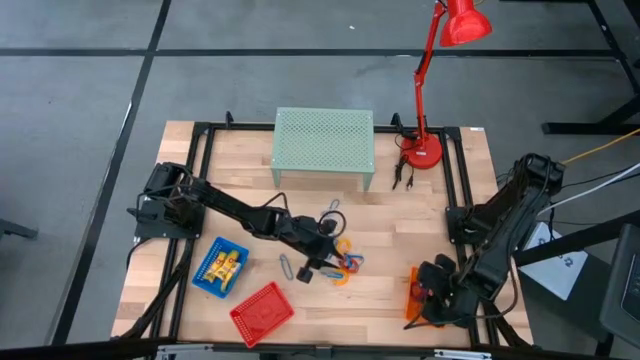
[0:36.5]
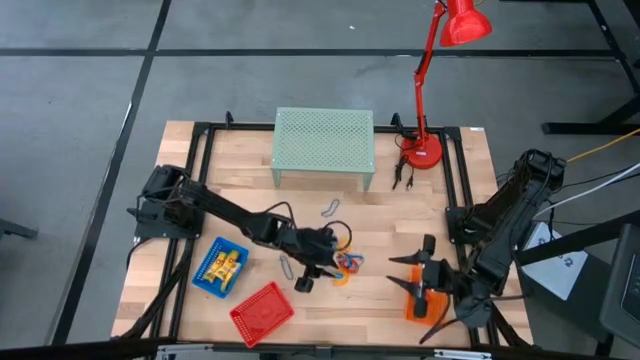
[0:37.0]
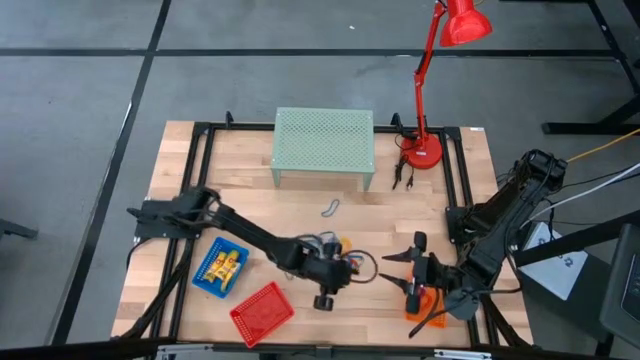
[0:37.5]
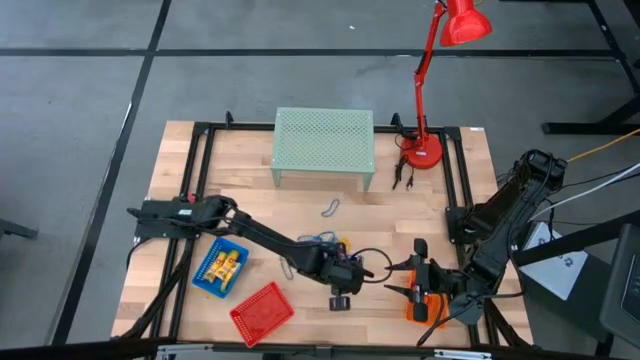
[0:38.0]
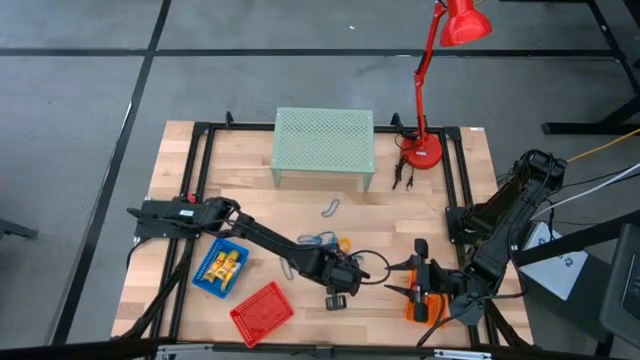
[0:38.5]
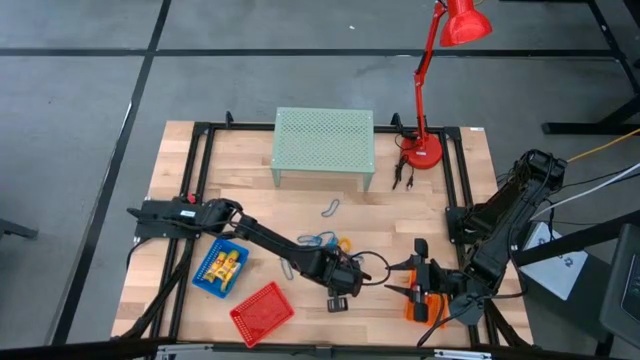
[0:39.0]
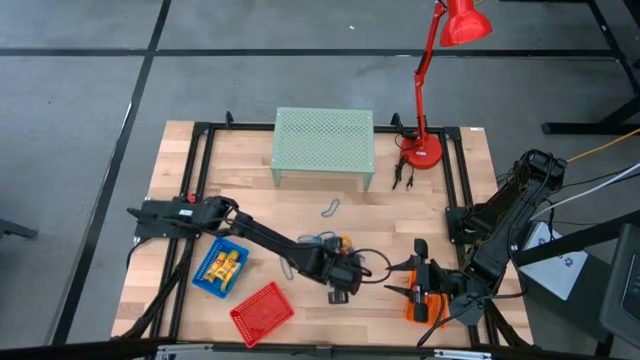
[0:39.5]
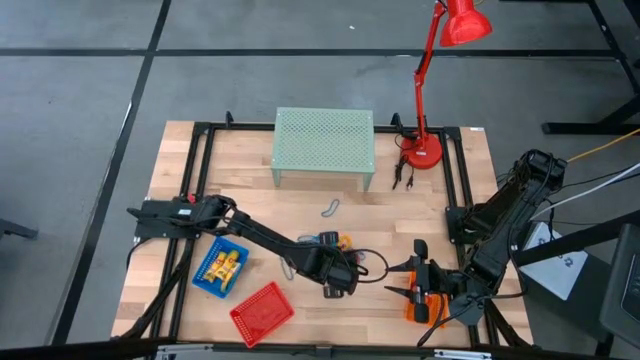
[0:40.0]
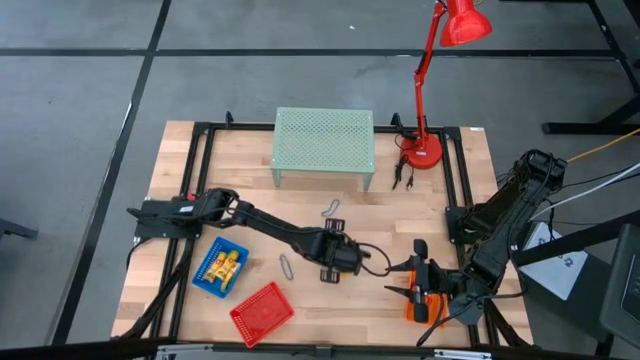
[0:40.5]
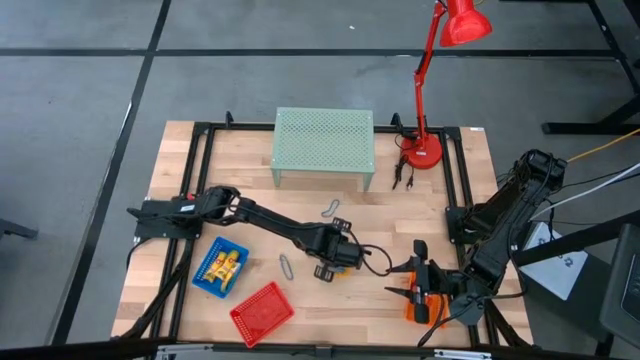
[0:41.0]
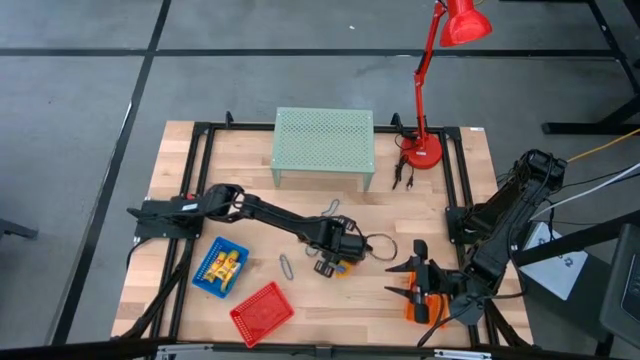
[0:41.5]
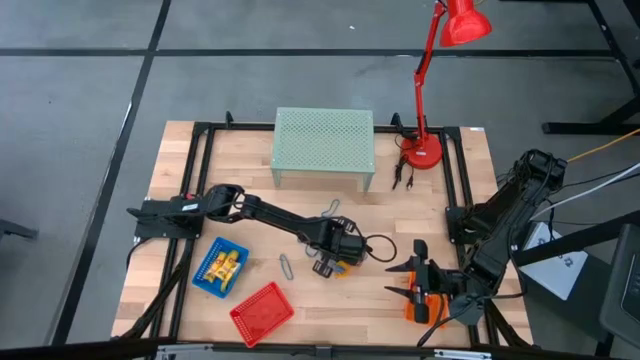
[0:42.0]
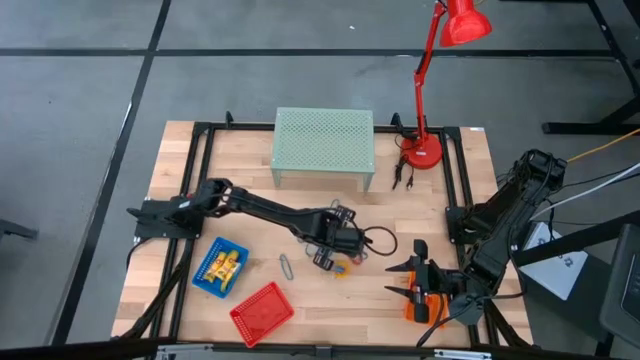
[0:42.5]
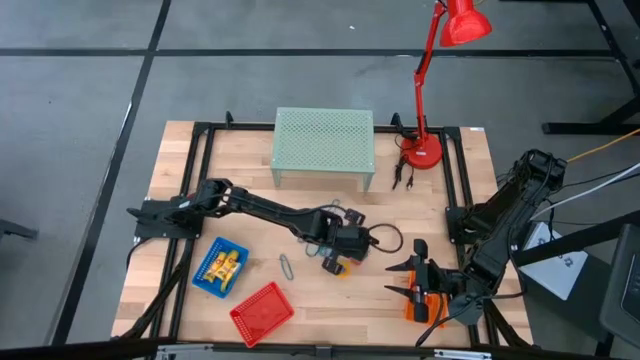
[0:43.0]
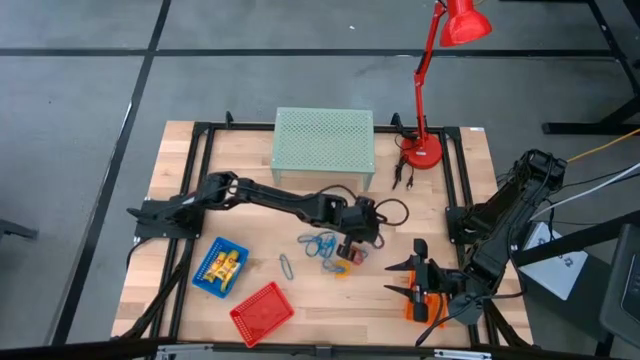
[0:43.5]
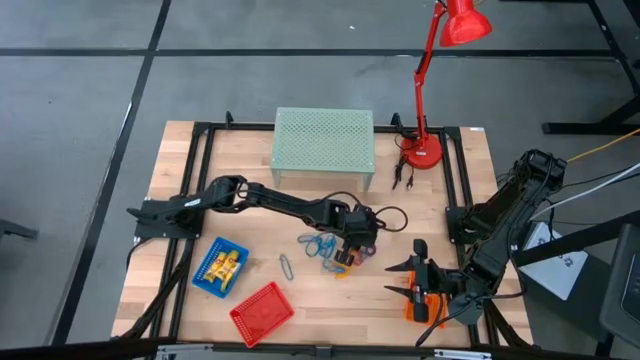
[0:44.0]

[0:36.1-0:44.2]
Task: Pick & Place Office Desk Supplies
Put the yellow spring keychain into the orange bin

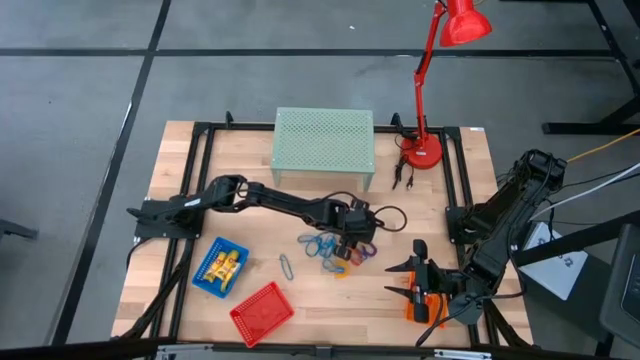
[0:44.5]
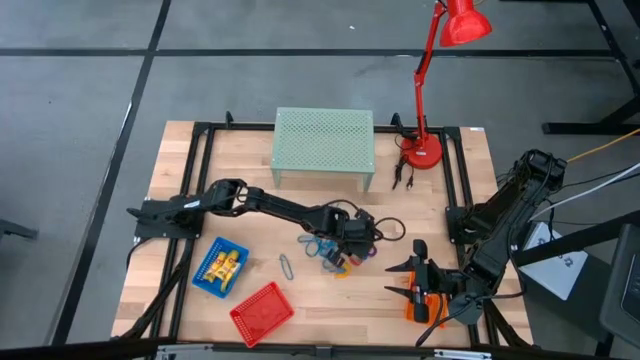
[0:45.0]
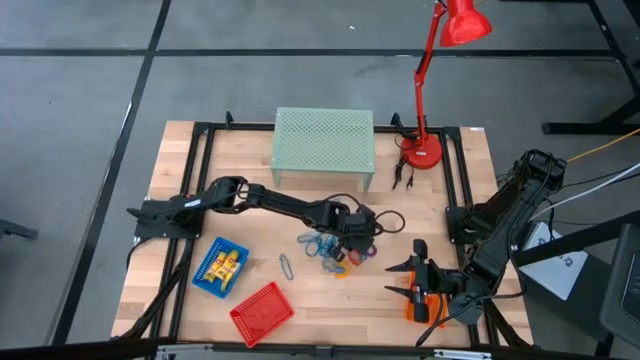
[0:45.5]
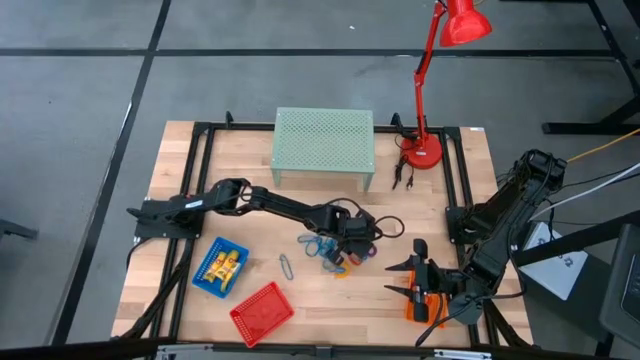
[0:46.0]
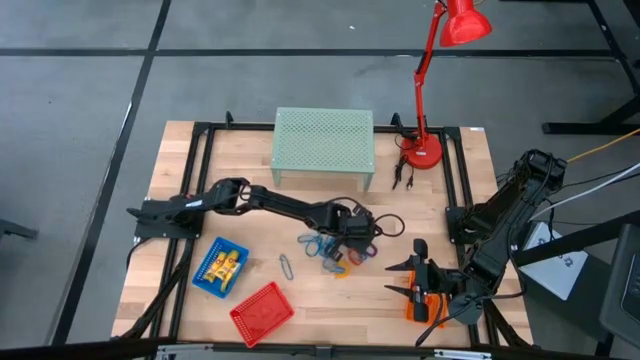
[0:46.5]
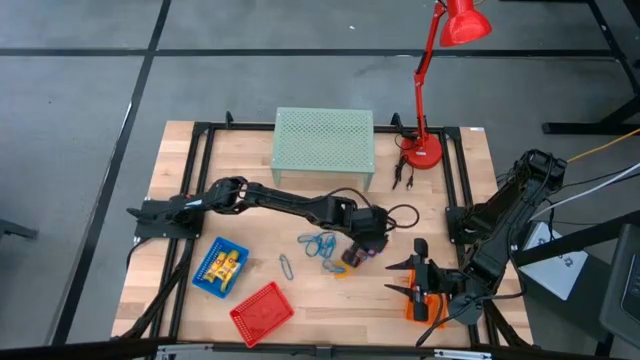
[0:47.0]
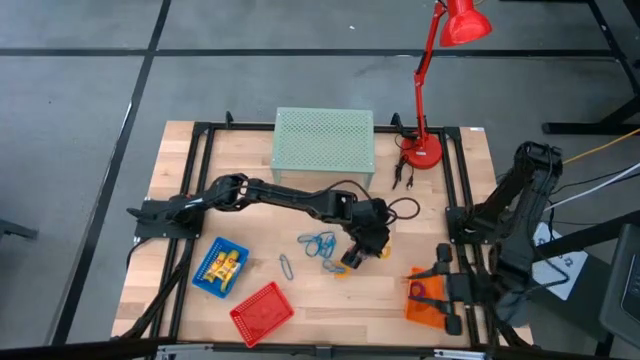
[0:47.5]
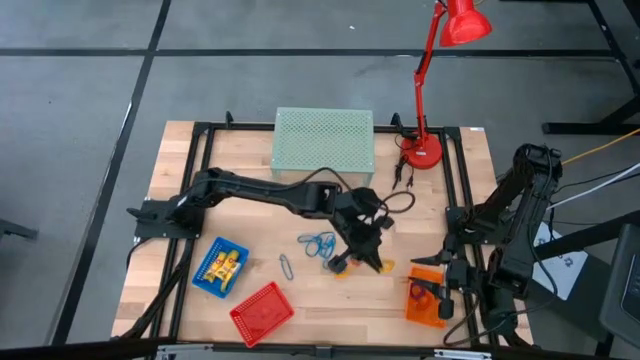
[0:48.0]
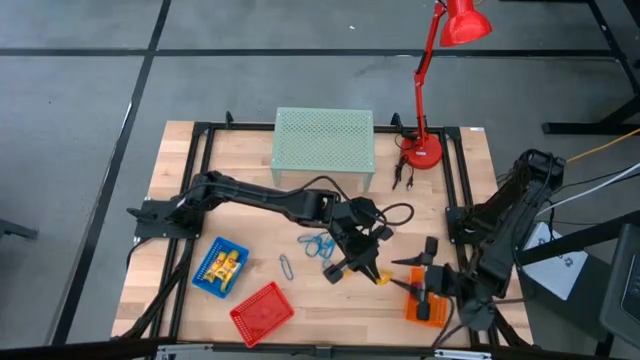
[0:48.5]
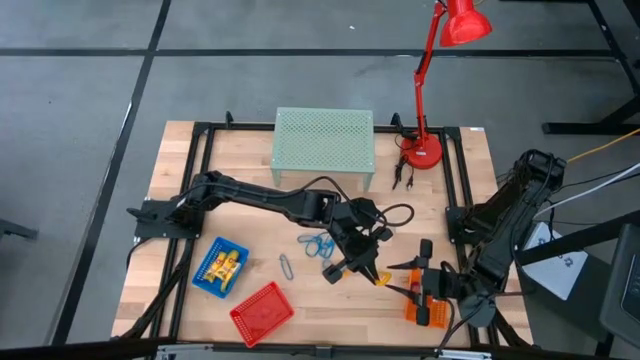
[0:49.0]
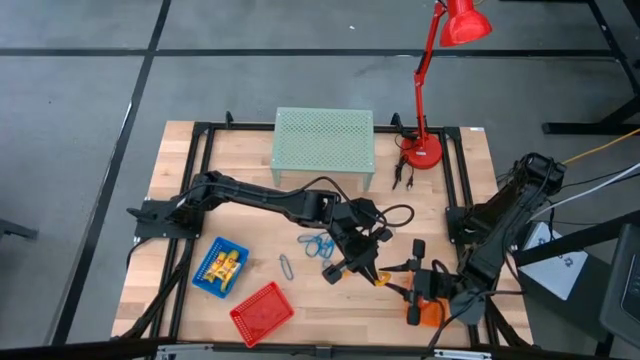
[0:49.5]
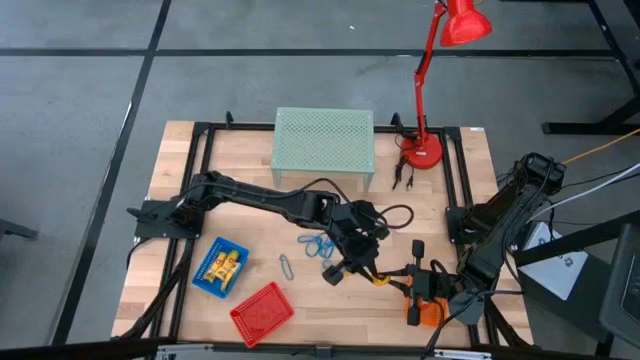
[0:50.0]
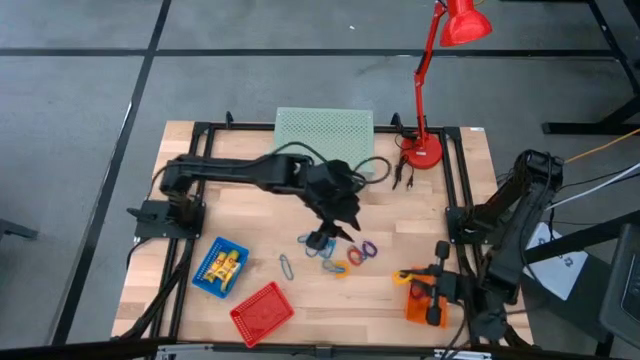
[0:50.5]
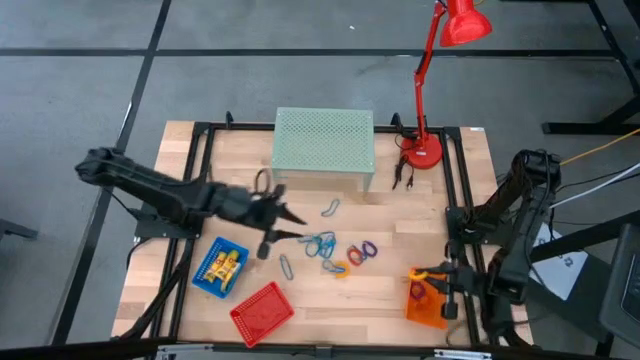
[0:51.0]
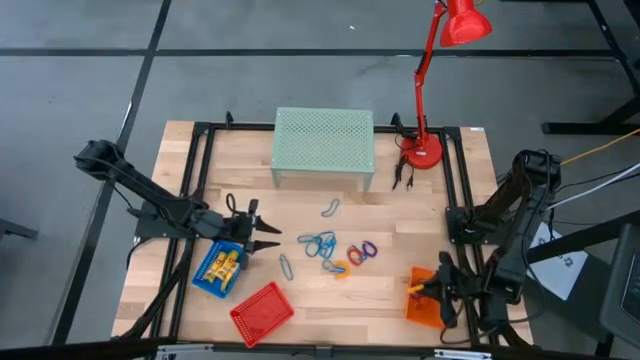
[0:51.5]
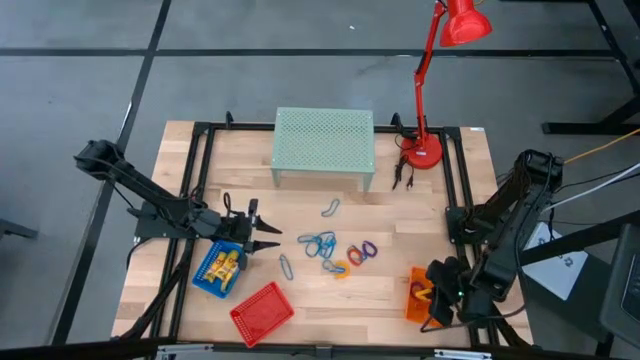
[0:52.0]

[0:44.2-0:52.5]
Put the yellow spring keychain into the orange bin

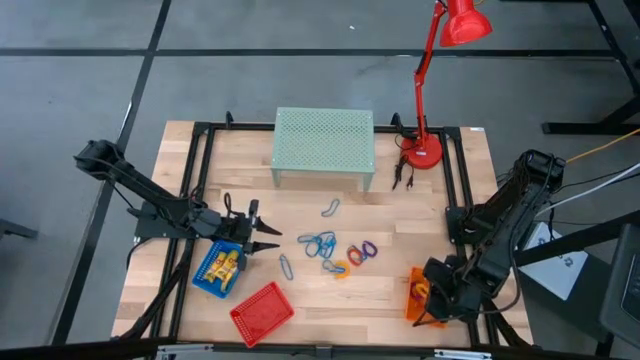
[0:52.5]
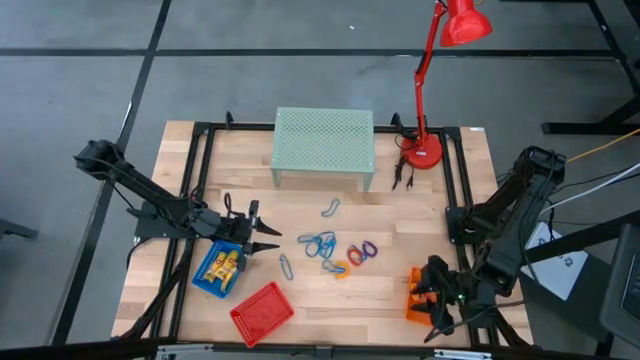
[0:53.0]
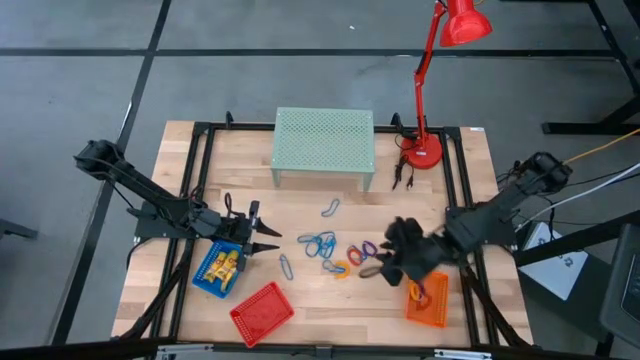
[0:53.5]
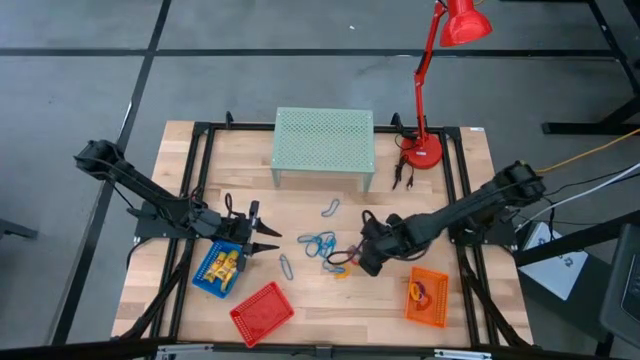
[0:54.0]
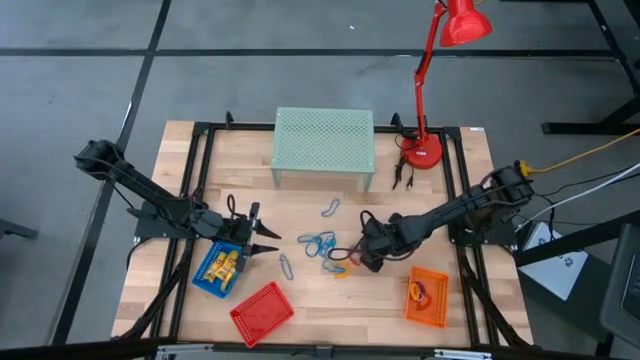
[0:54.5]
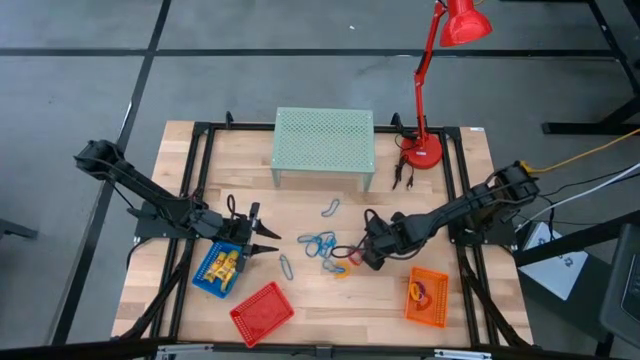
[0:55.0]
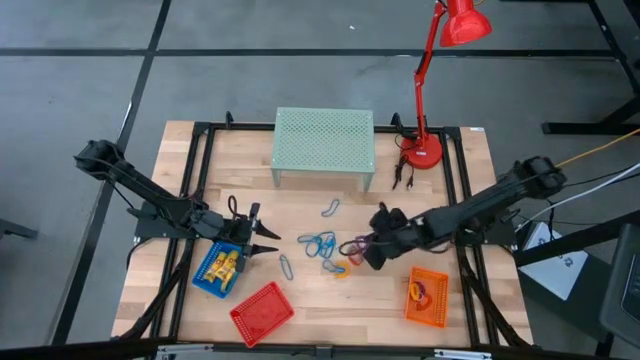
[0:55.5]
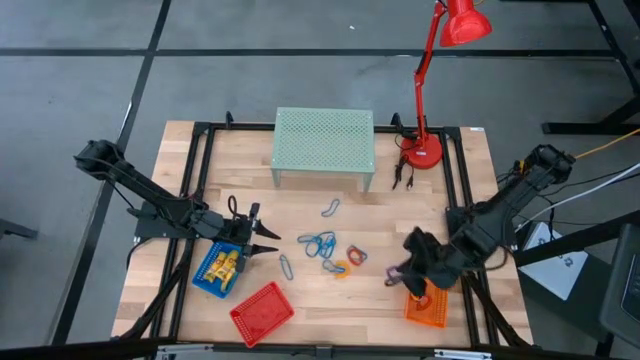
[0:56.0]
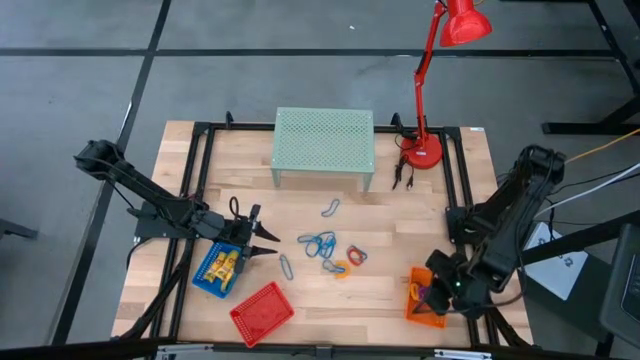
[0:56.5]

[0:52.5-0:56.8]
Put the violet spring keychain into the orange bin

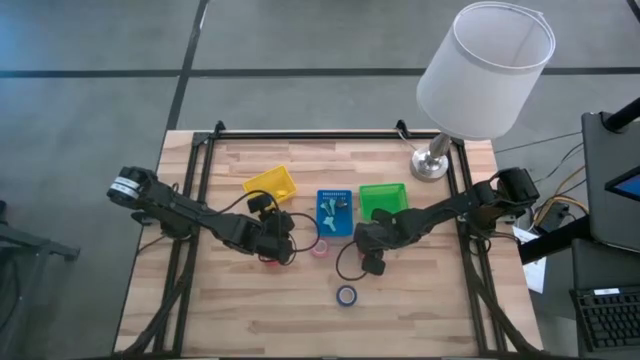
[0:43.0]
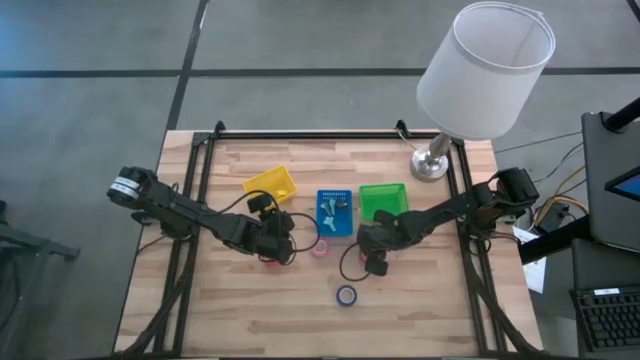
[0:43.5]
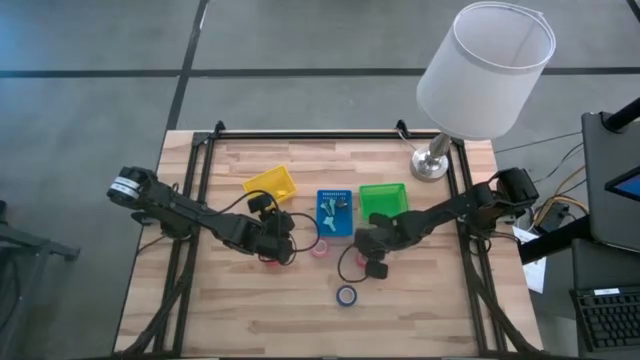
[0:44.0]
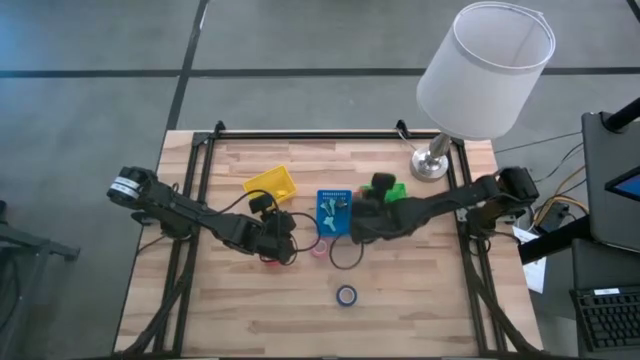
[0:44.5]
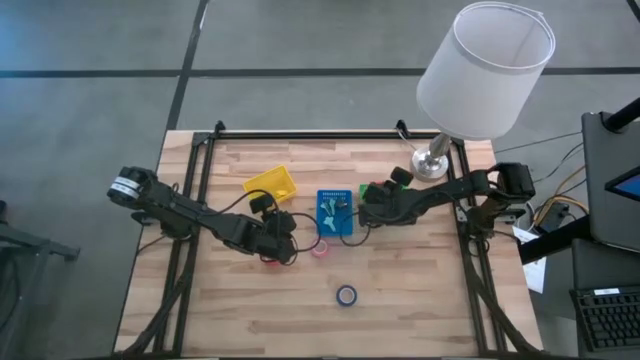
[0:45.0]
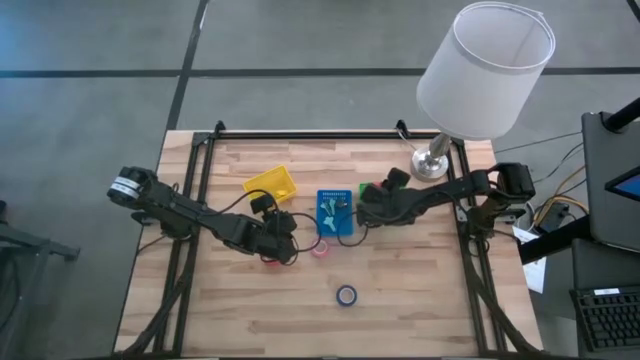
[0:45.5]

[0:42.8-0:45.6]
Task: Pick and place Stapler, Stapler remover, tape
Put the red tape into the green basket
